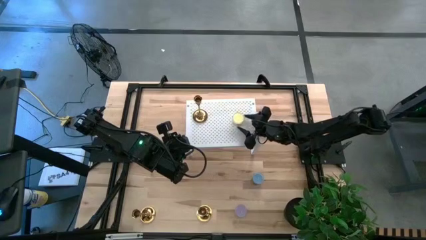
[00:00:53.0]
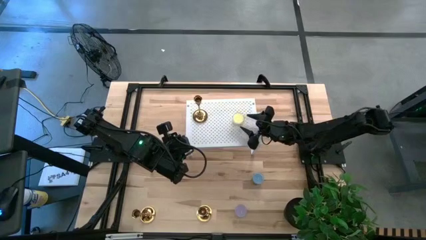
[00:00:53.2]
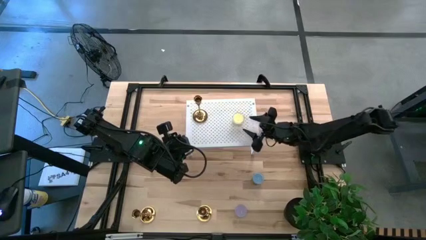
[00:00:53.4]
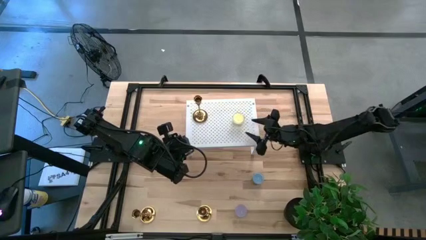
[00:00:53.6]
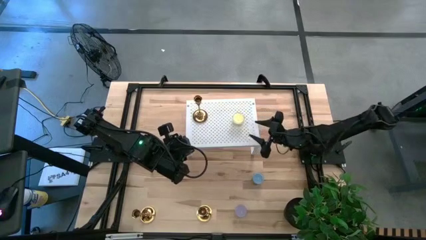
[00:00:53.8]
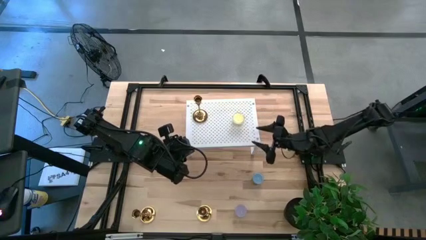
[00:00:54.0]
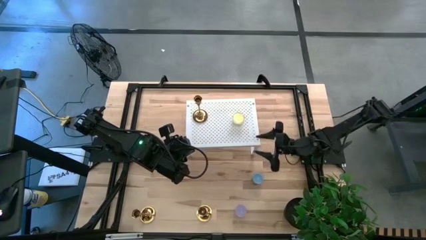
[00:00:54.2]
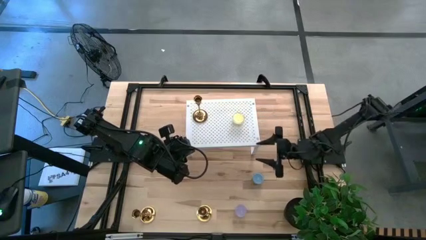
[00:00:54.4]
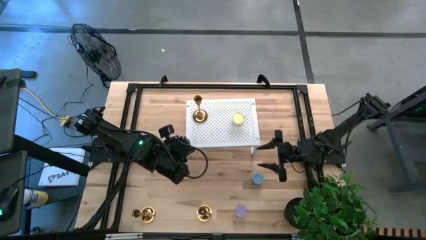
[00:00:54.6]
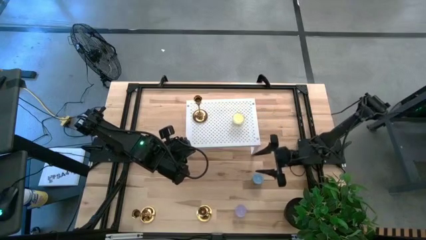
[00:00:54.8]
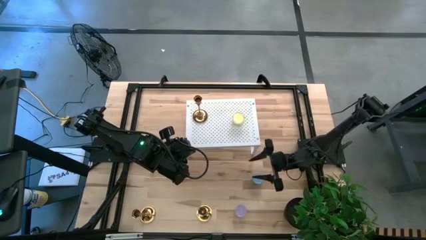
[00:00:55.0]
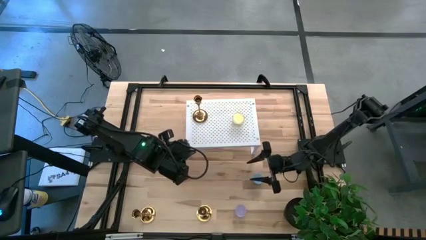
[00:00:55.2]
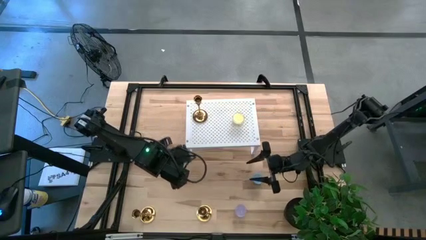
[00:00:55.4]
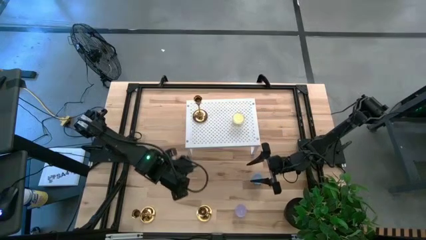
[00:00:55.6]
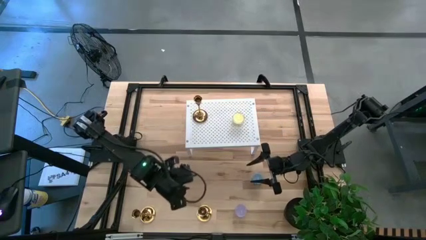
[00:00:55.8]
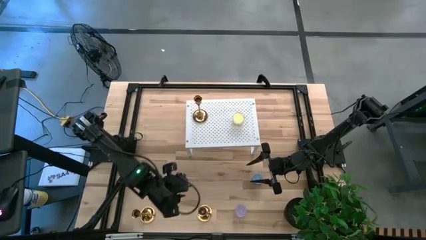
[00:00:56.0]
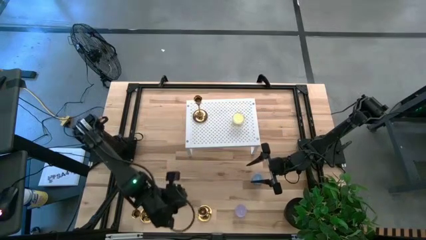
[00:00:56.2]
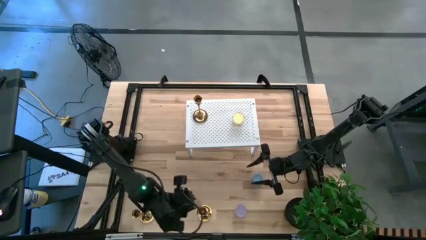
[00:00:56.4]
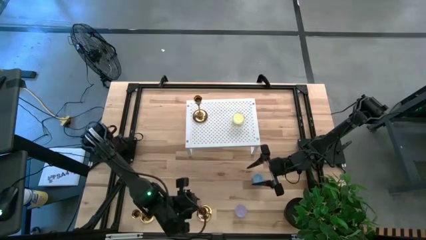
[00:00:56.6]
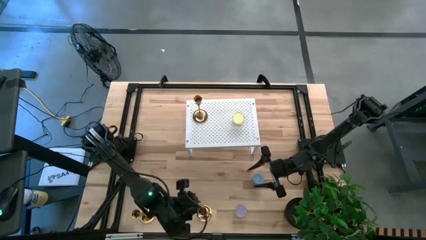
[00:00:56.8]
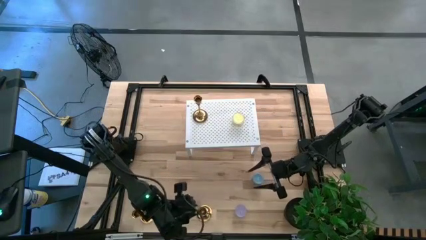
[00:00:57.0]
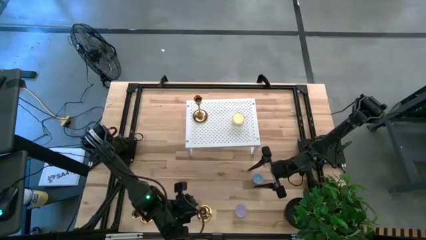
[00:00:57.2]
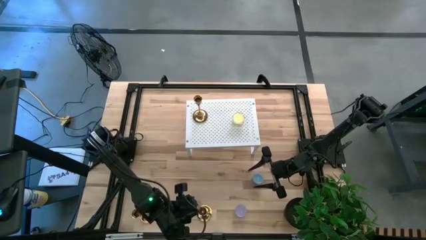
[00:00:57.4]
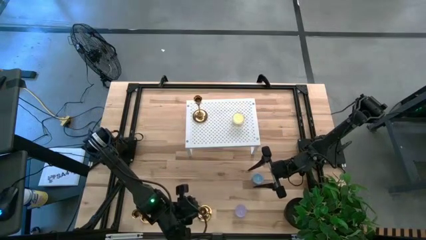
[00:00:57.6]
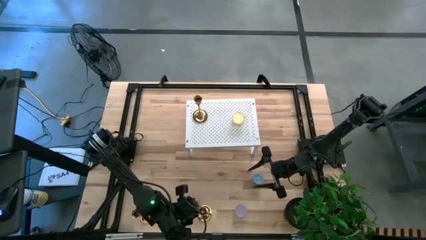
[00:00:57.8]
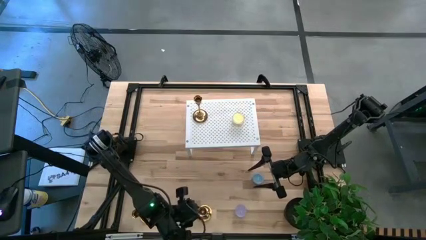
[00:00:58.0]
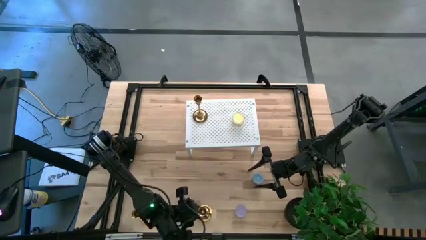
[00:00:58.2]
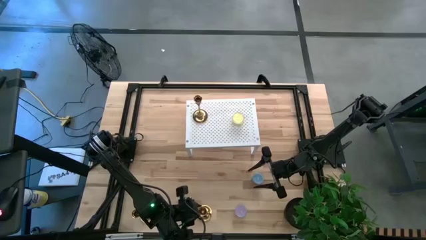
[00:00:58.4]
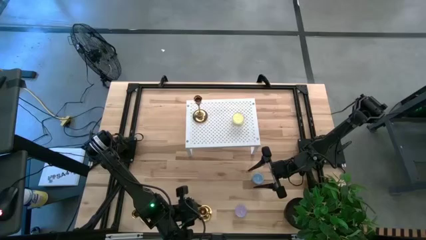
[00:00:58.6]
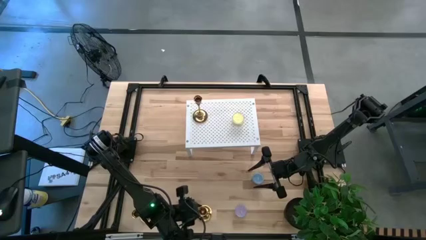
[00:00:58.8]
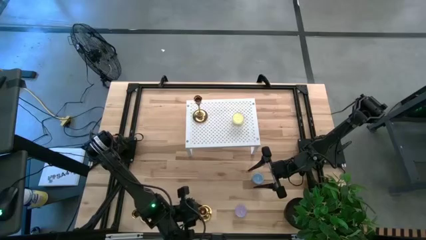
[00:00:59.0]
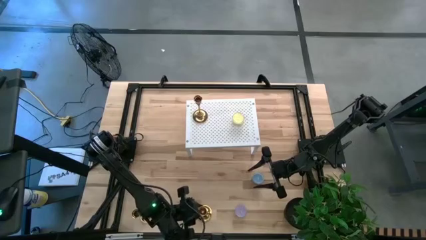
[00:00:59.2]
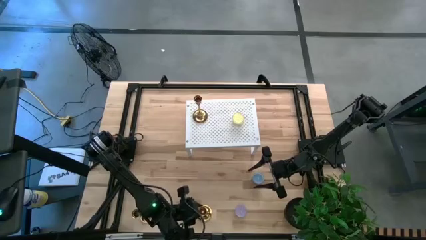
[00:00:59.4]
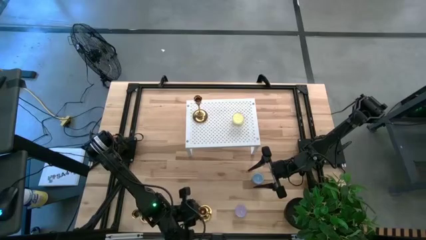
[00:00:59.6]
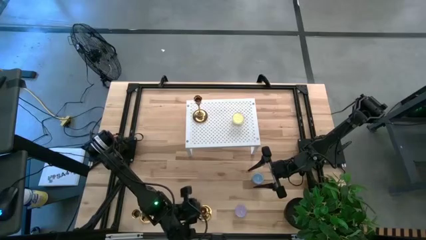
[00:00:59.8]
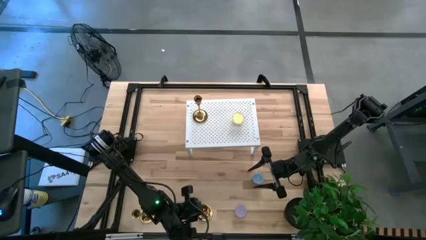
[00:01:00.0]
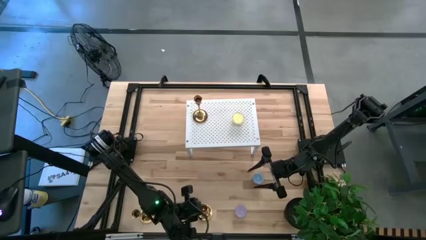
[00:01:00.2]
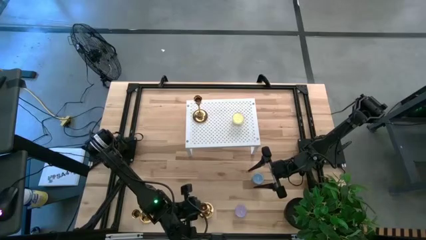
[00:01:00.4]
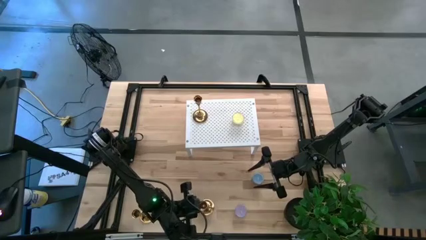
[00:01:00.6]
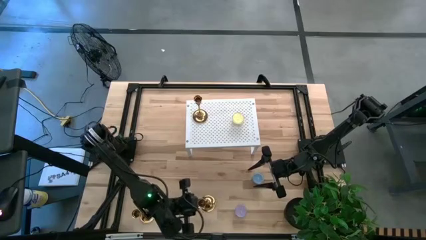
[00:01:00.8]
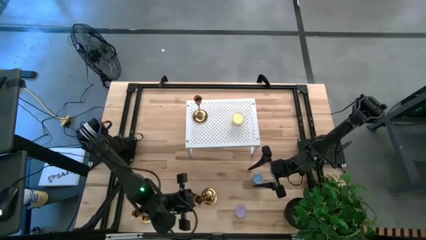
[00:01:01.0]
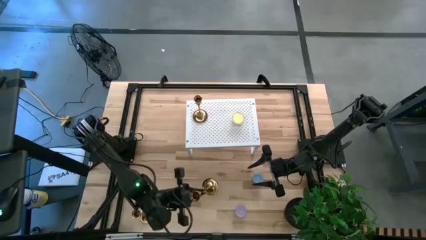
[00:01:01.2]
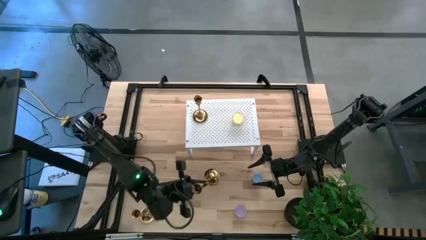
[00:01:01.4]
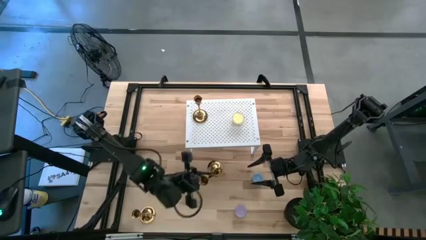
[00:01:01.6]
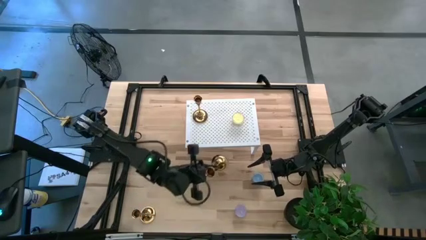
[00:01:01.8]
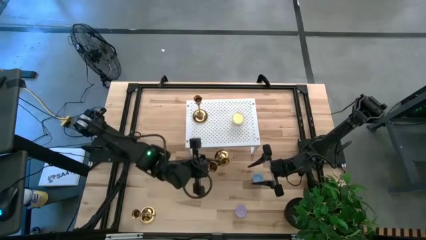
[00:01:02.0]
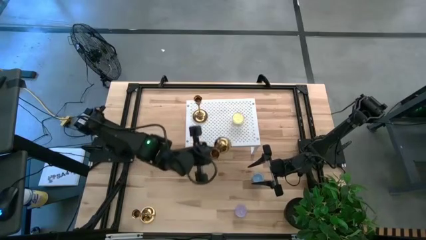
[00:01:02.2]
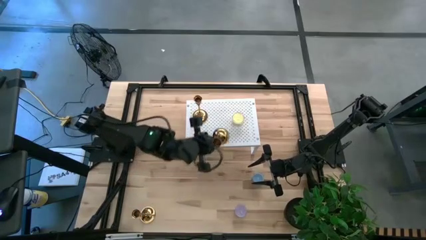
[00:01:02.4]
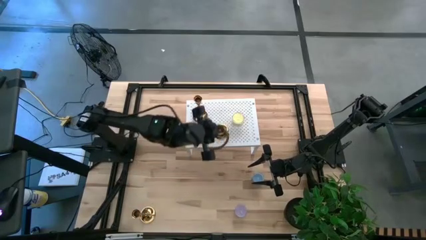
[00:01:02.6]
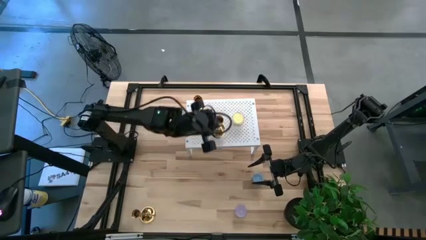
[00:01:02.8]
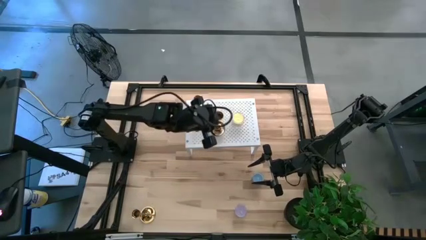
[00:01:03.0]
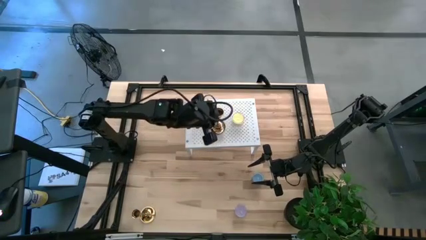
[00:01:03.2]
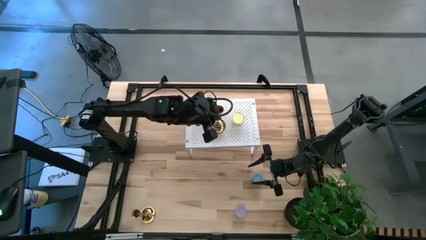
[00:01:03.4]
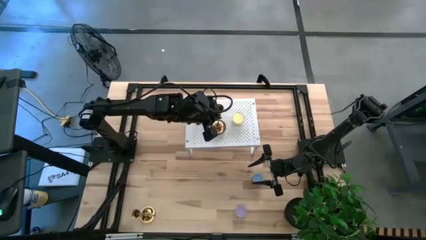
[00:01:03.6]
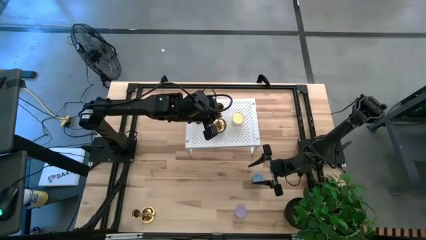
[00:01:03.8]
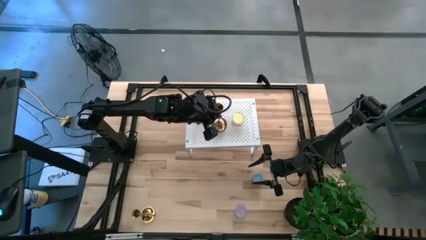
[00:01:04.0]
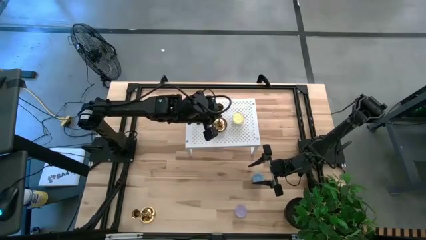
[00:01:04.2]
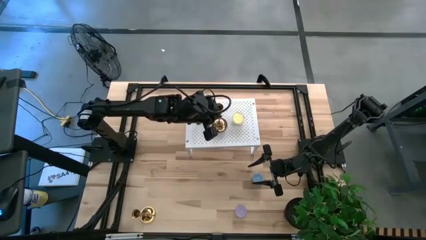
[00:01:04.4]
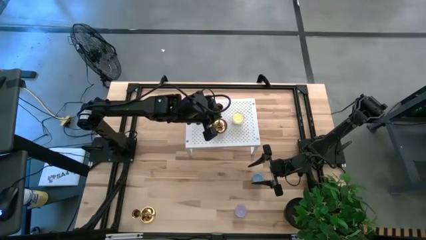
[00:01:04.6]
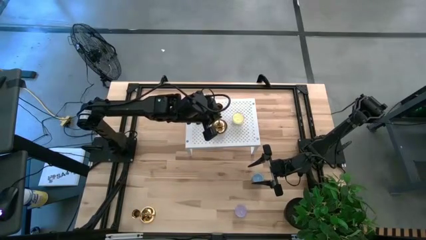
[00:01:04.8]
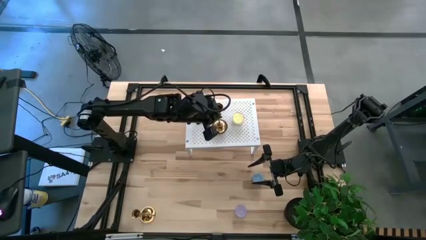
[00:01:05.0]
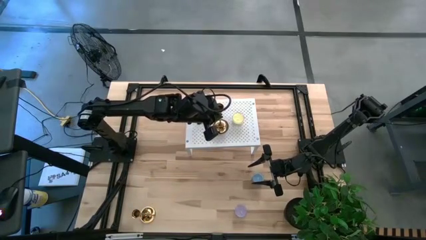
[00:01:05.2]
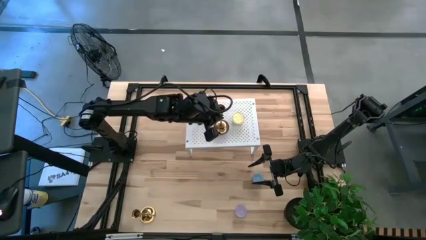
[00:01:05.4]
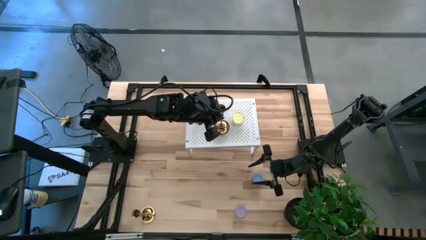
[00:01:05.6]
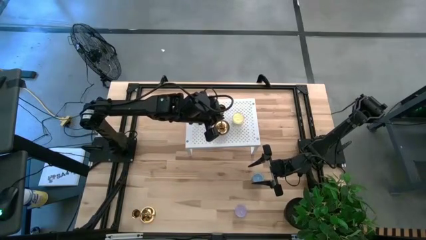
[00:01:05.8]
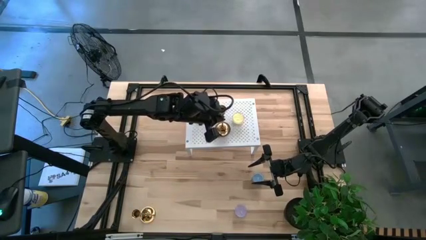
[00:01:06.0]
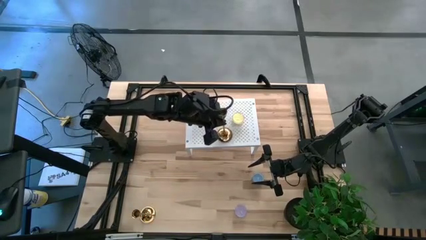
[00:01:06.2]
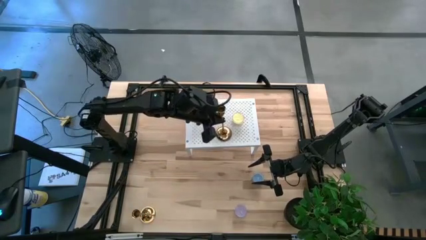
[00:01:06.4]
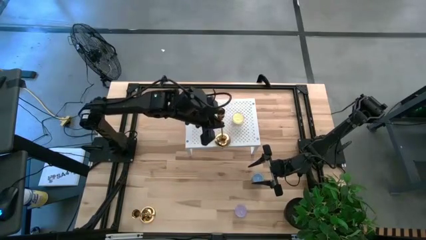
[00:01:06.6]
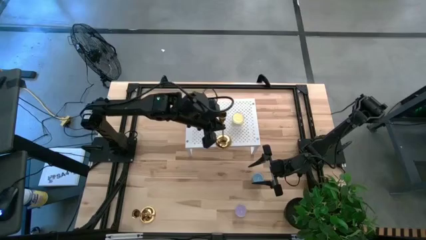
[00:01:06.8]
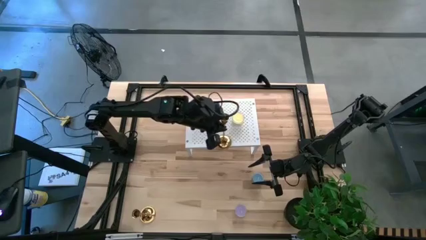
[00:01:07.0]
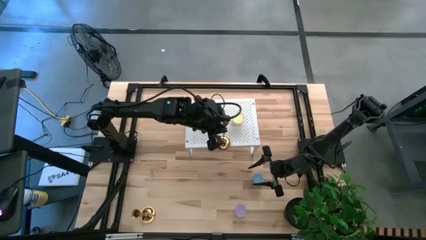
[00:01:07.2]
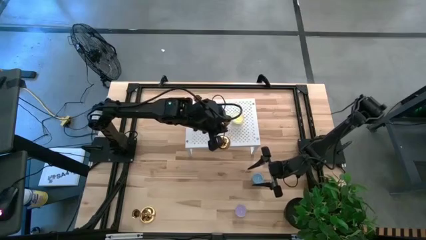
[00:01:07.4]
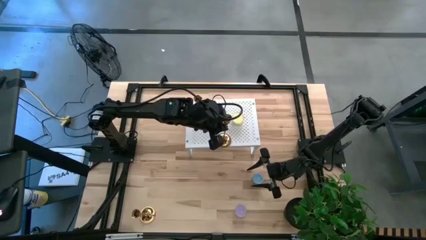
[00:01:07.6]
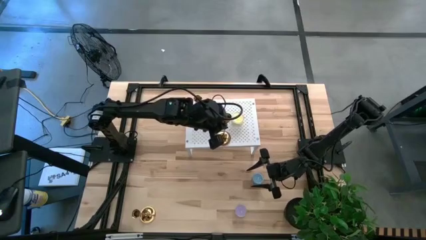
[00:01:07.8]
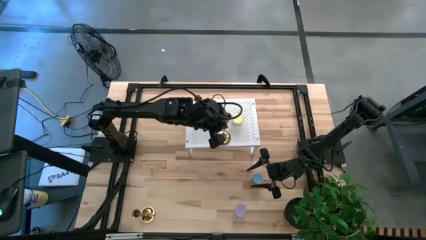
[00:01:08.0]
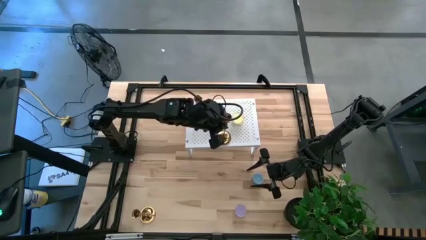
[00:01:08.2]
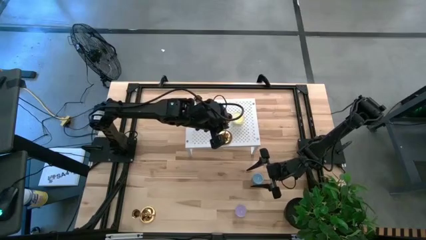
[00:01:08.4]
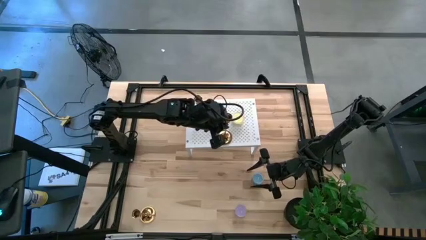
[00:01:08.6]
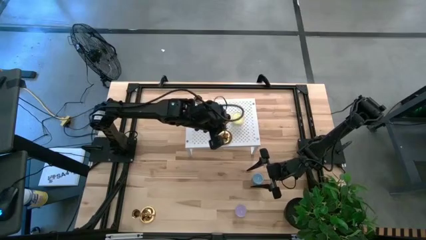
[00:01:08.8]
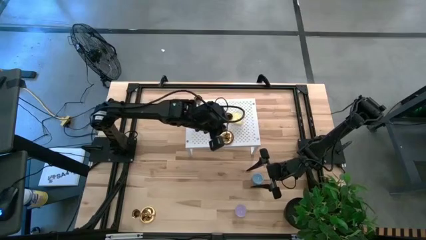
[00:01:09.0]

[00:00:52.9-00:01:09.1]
Task: Pick & Place candle stick holders
Put the right yellow candle holder on the shelf
